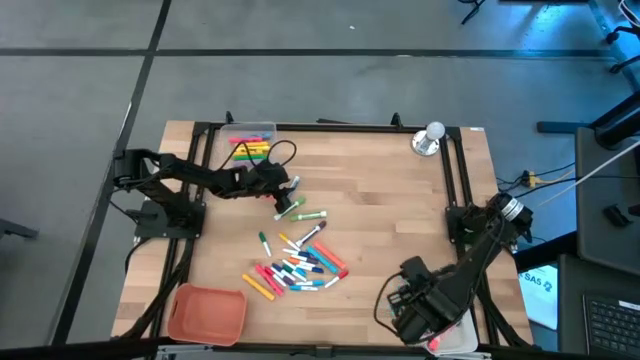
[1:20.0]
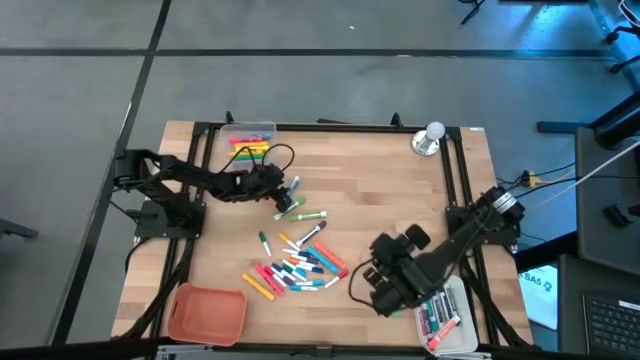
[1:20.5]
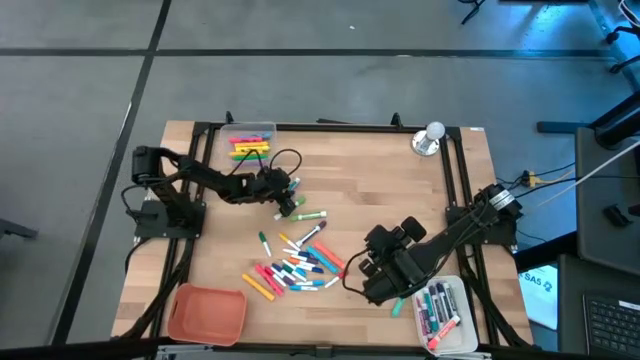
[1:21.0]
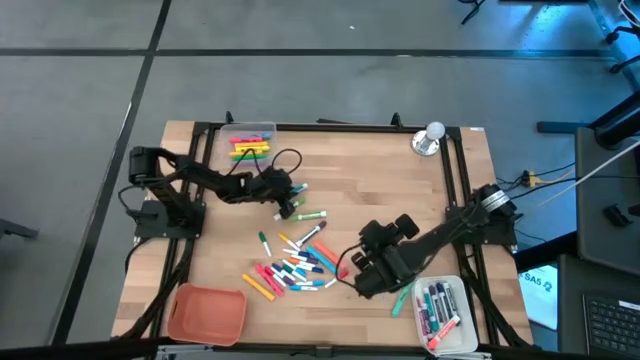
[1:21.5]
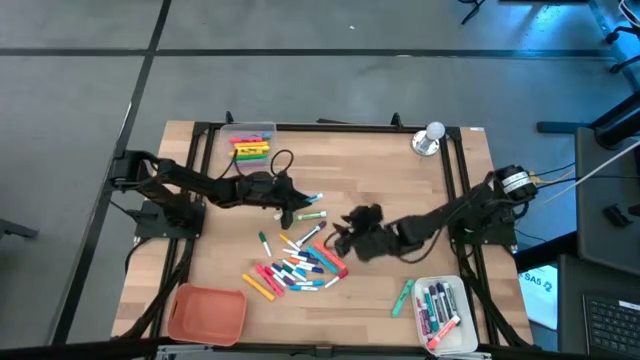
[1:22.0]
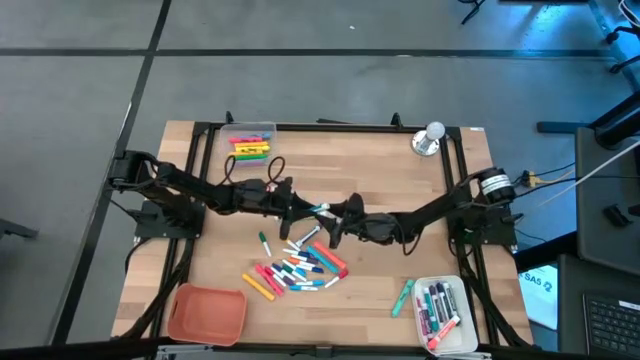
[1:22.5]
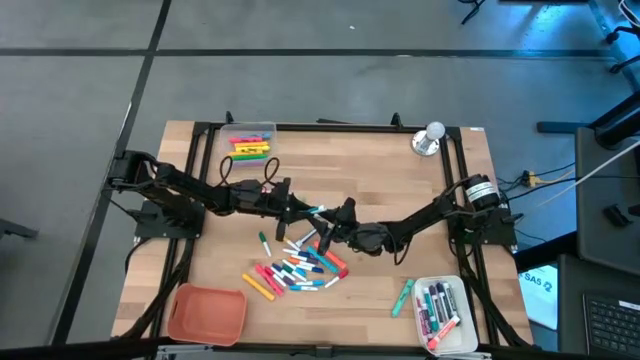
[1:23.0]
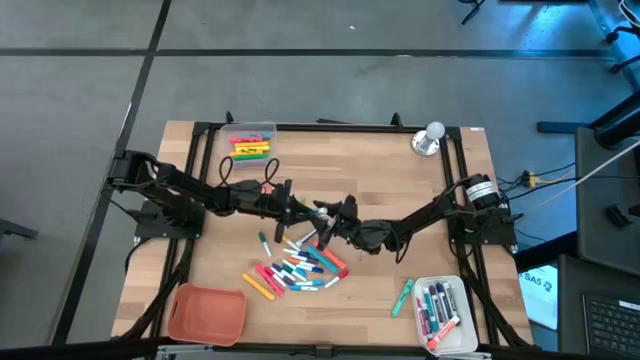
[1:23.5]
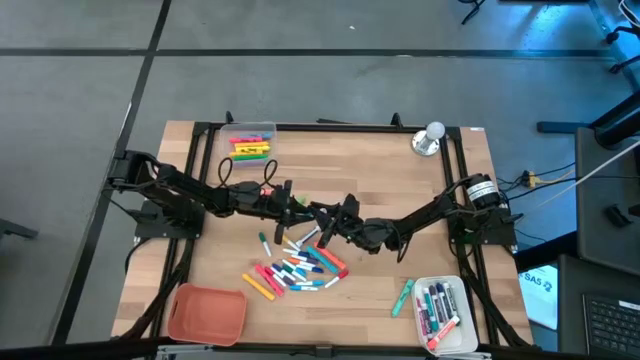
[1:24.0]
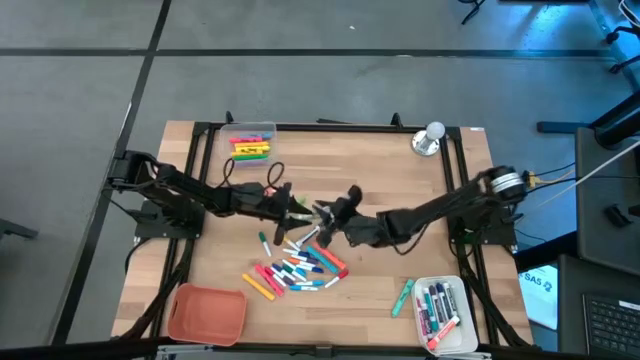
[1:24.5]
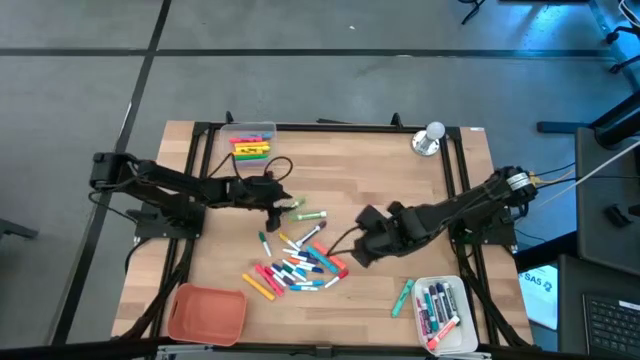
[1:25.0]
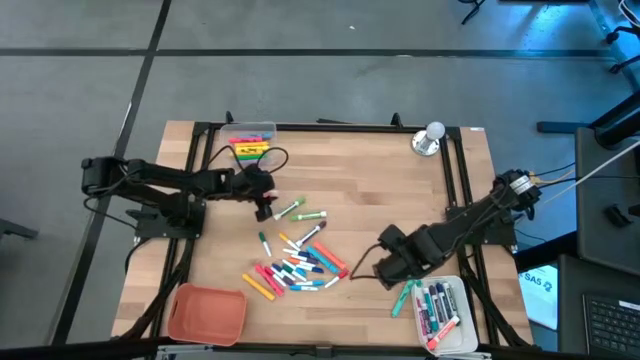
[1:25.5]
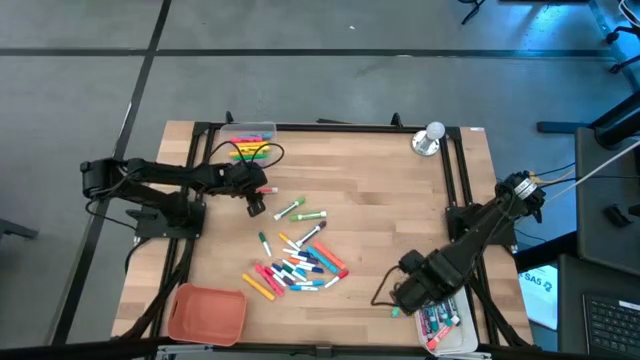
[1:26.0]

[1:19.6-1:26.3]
Task: Pick & Place Markers
Put the middle center pitch blue pen into the white bin

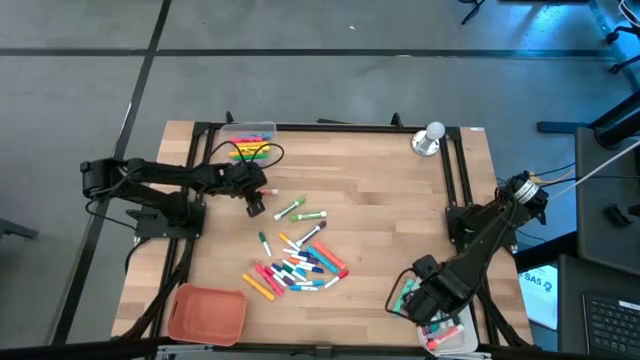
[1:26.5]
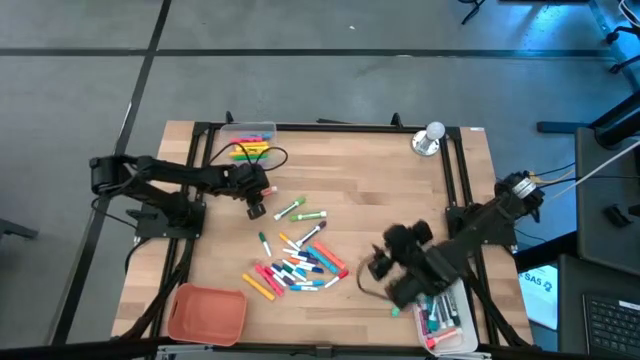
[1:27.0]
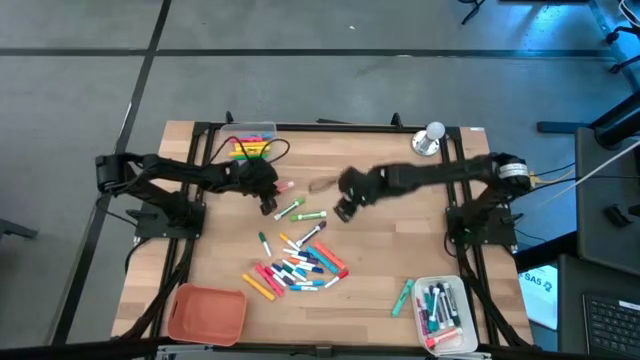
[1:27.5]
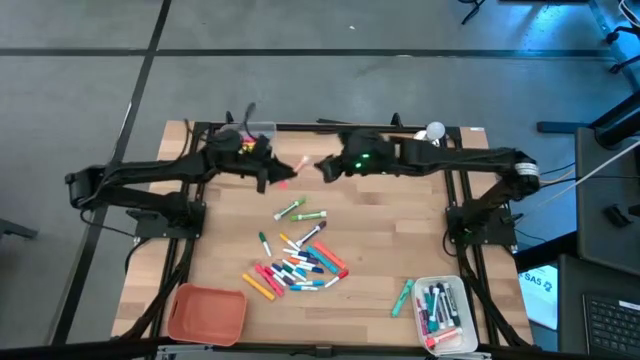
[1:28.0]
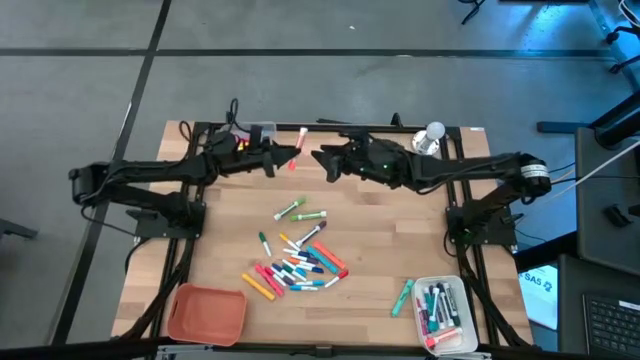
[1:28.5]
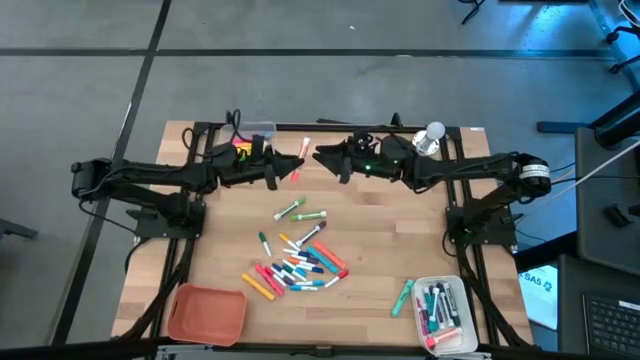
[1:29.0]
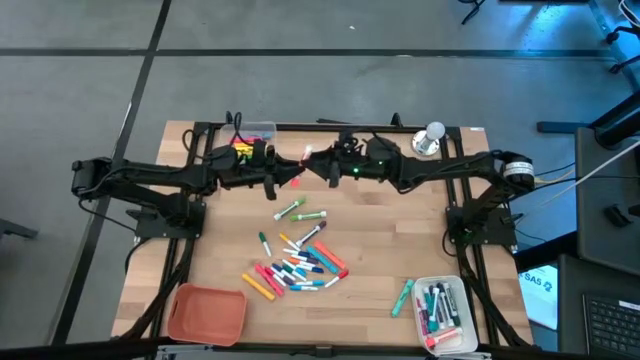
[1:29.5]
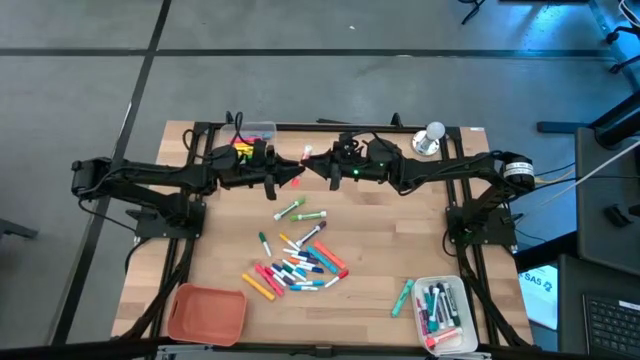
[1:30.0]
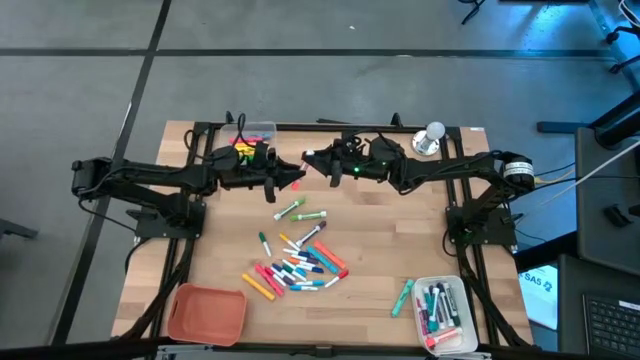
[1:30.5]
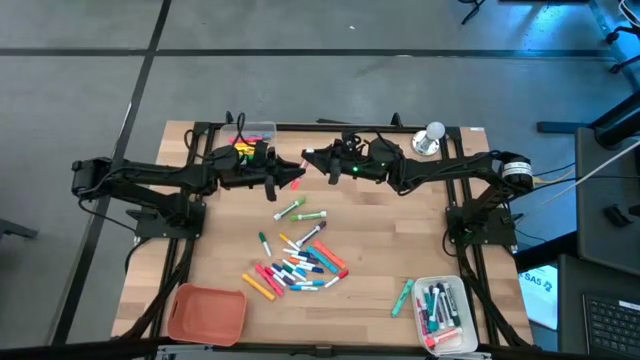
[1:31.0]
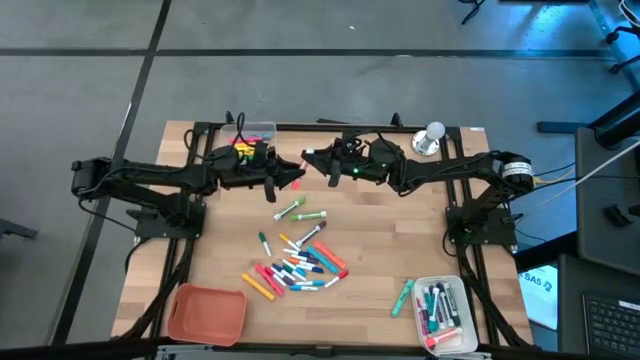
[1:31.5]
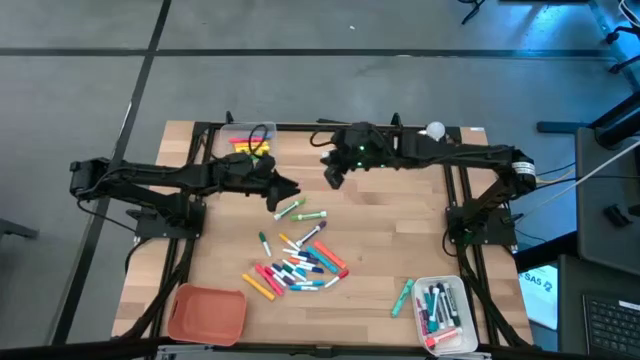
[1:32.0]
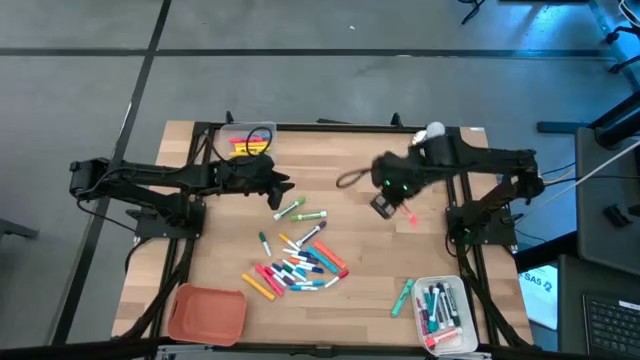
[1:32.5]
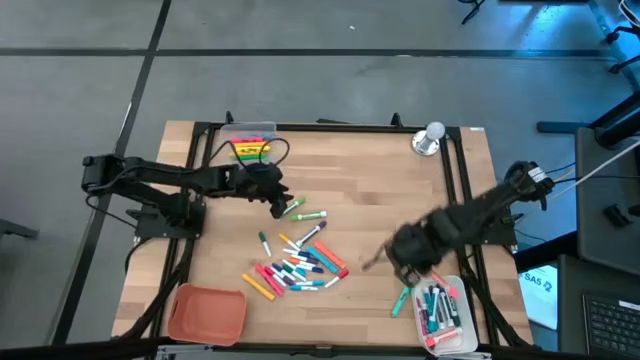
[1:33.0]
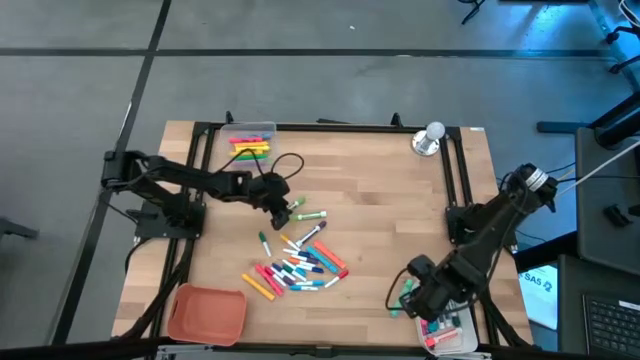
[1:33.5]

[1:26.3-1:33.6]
Put the middle center orange pen into the white bin

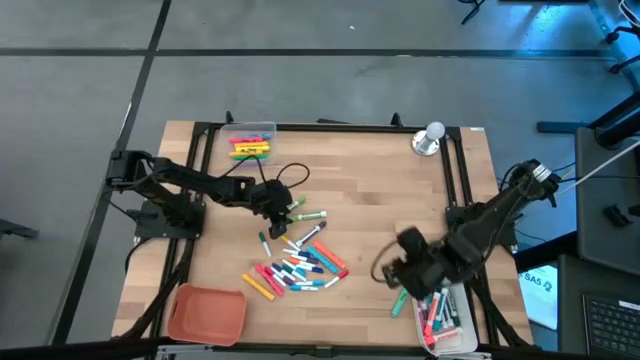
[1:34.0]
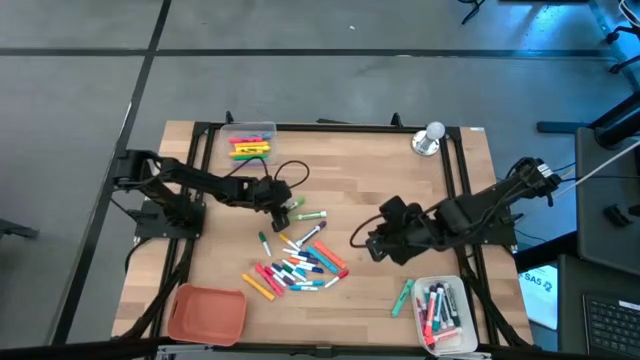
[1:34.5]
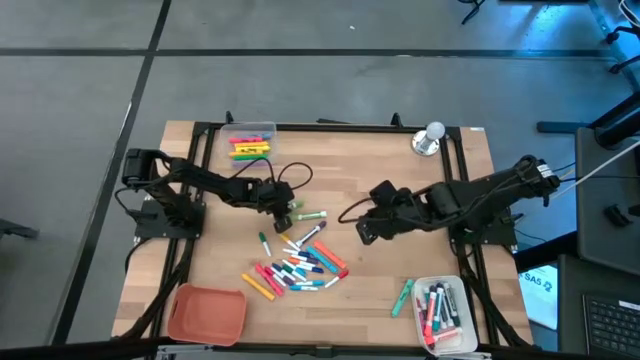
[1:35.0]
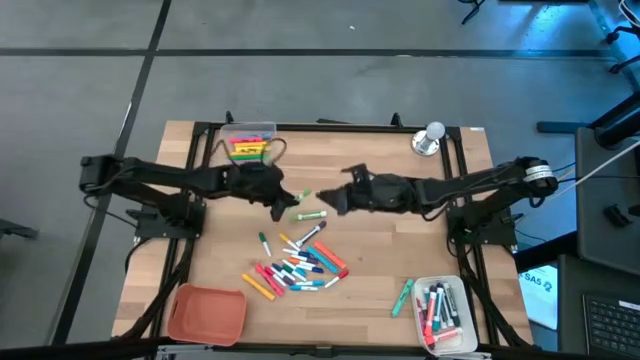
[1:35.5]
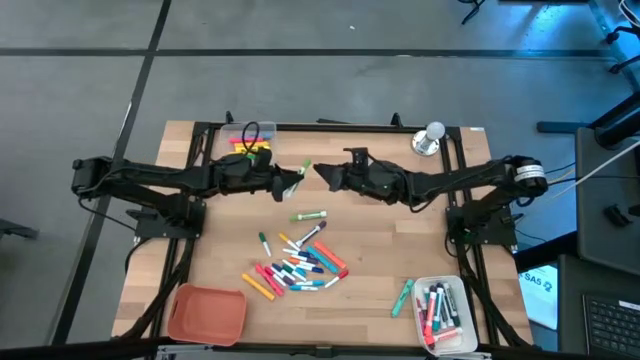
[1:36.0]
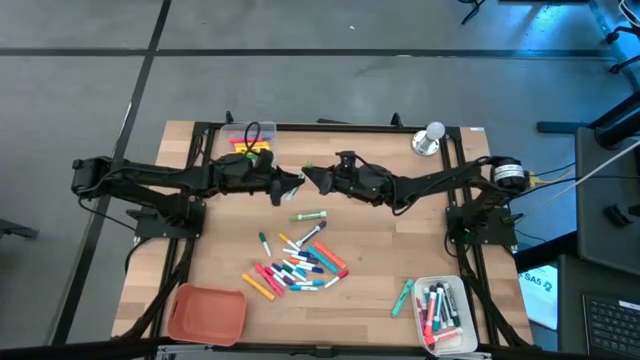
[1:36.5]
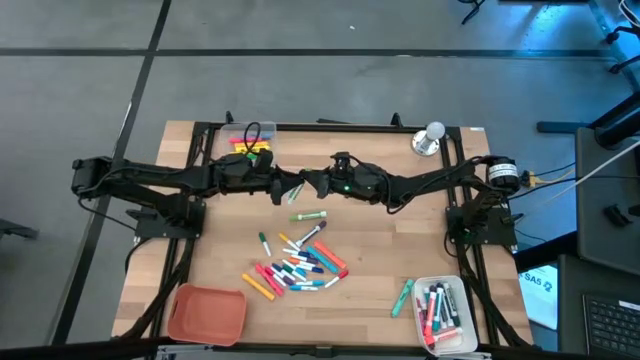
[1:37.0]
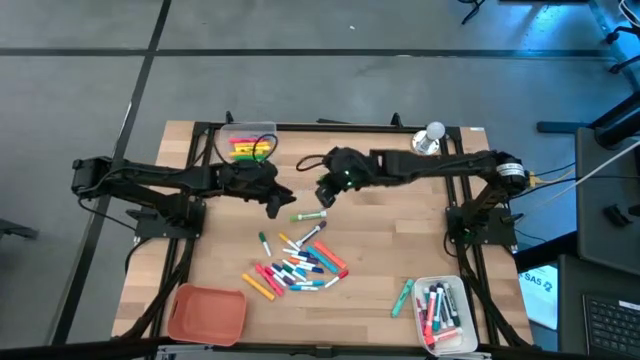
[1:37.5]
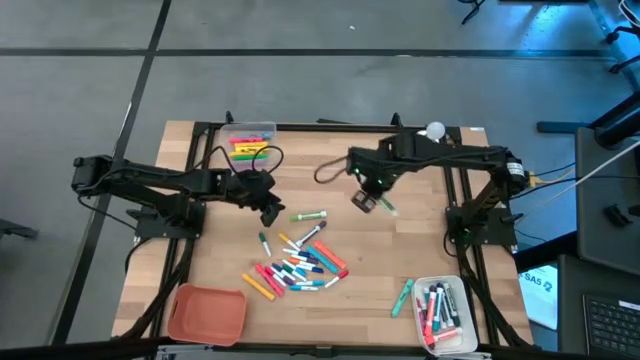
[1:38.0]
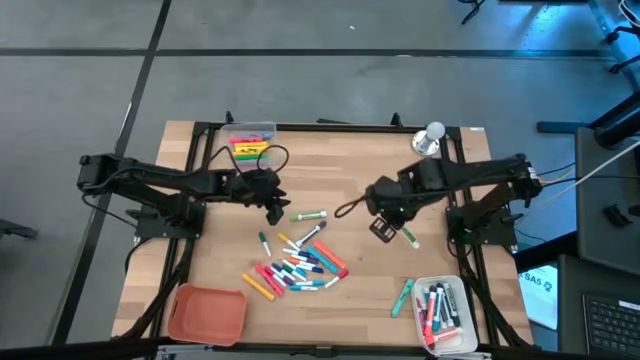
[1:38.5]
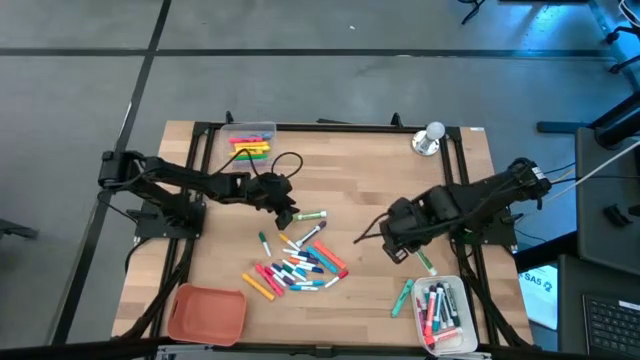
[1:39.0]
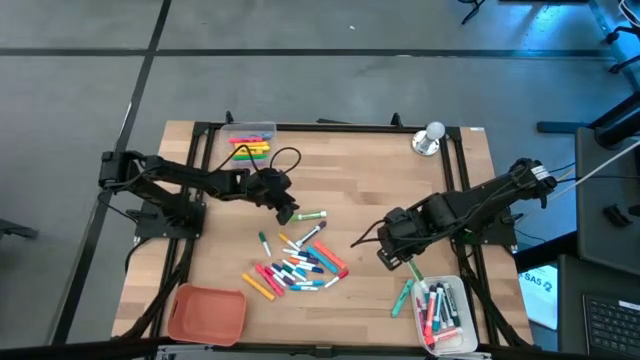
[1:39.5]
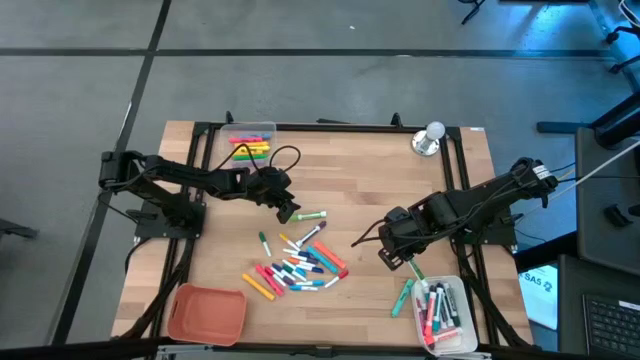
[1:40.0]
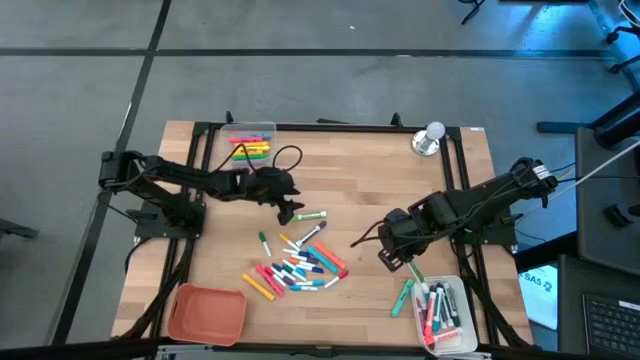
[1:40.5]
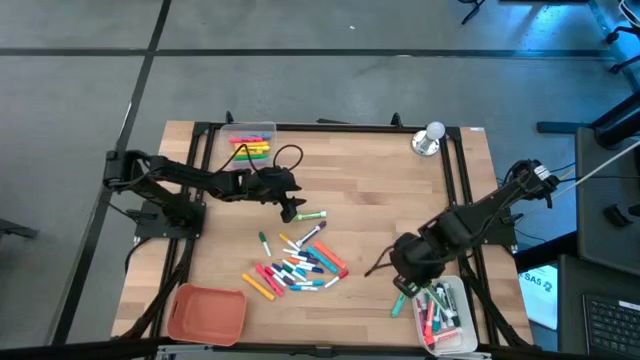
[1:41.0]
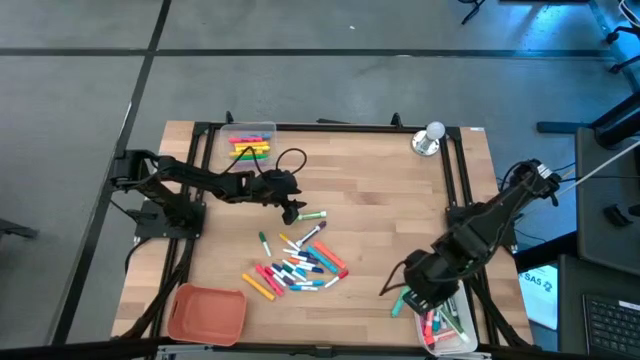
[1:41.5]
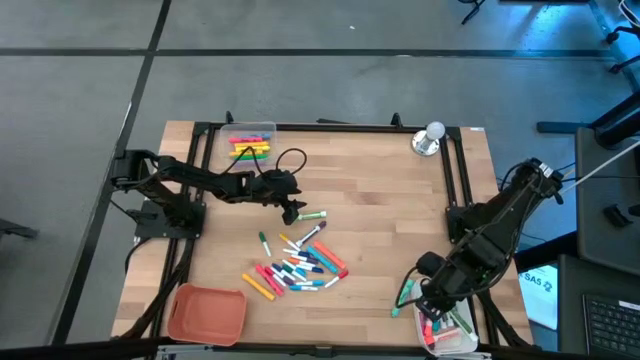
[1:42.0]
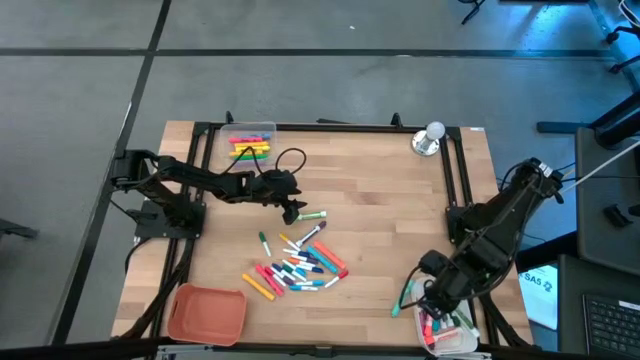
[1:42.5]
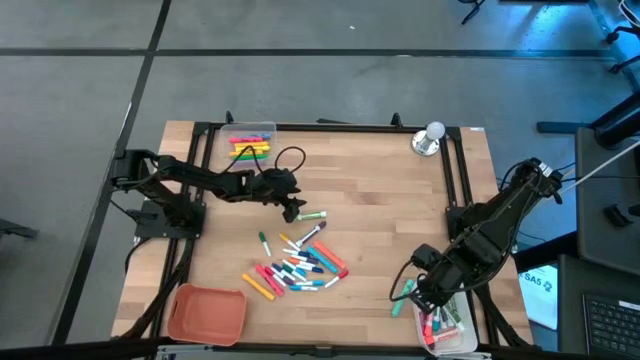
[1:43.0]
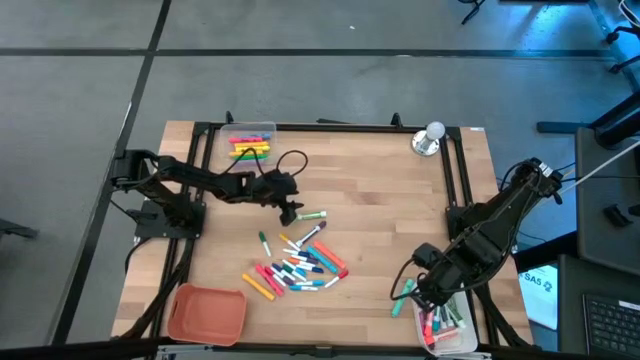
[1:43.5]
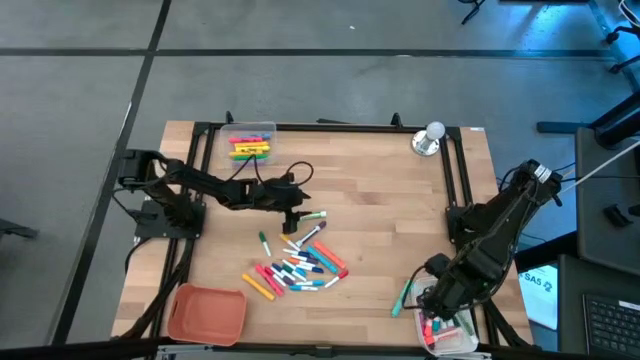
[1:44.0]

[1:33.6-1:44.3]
Put the middle center pitch green pen into the white bin
